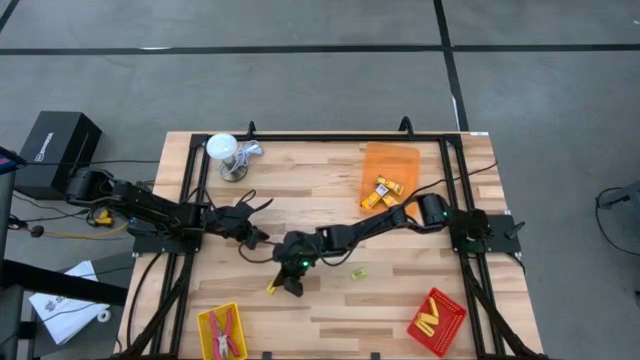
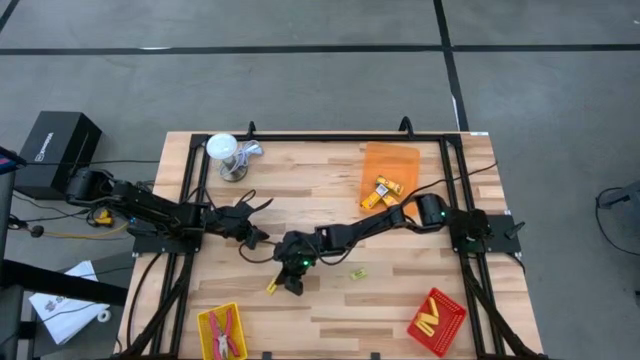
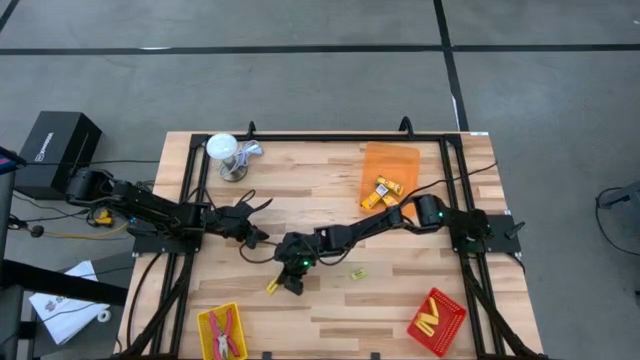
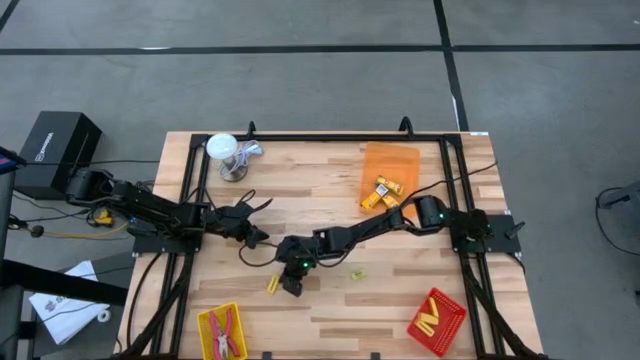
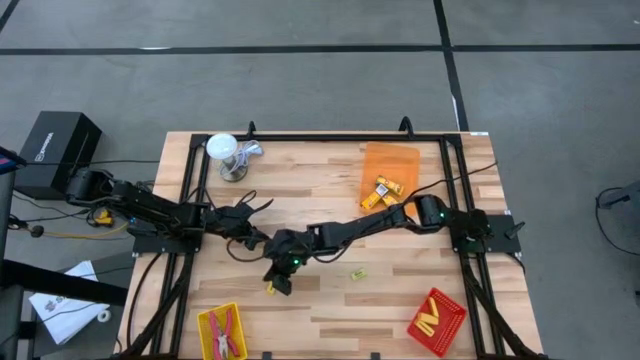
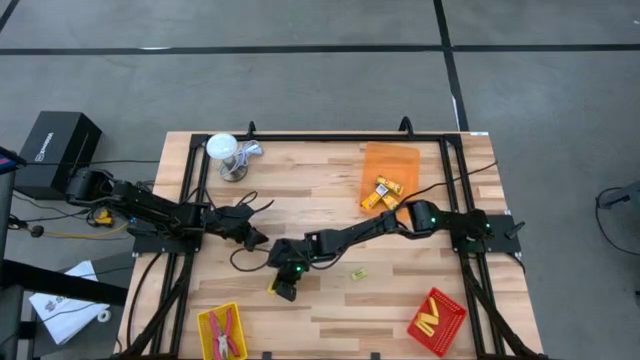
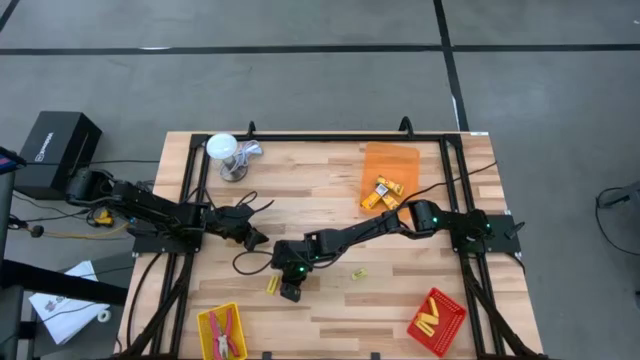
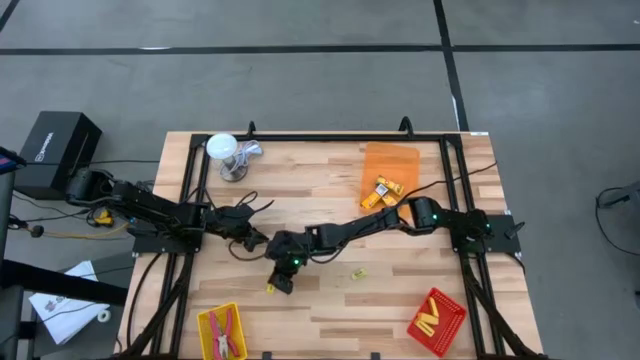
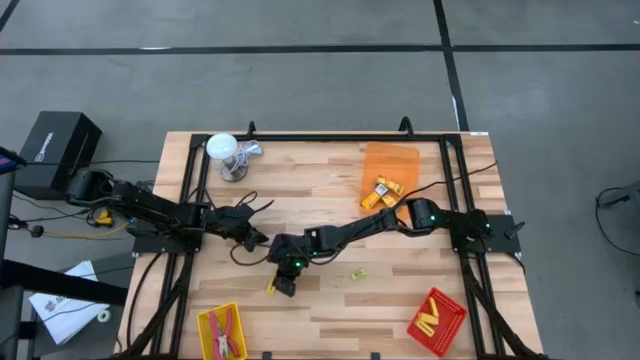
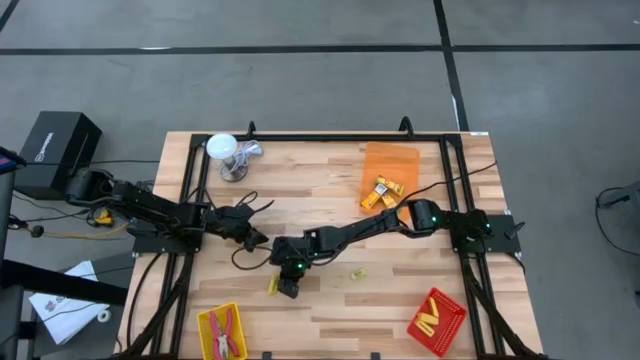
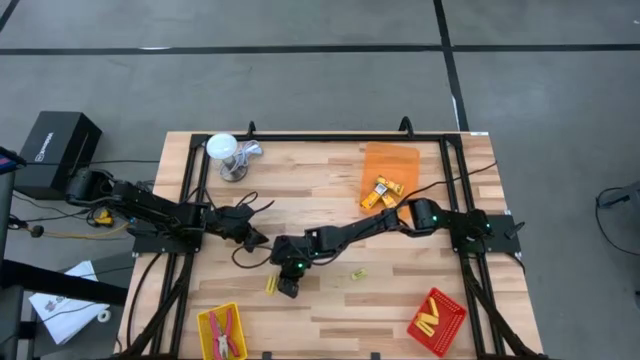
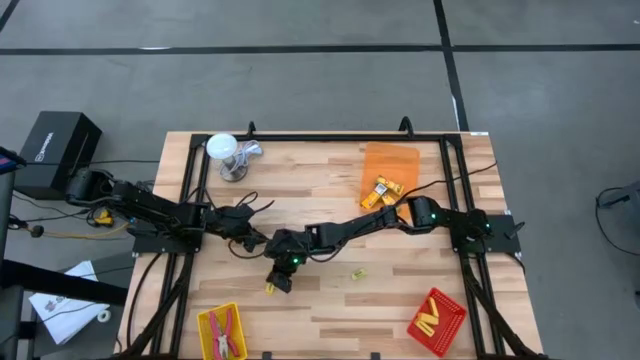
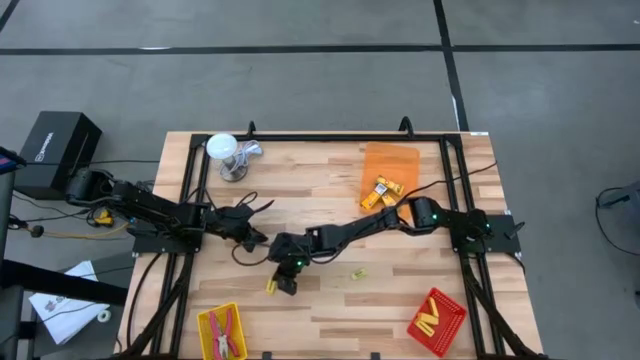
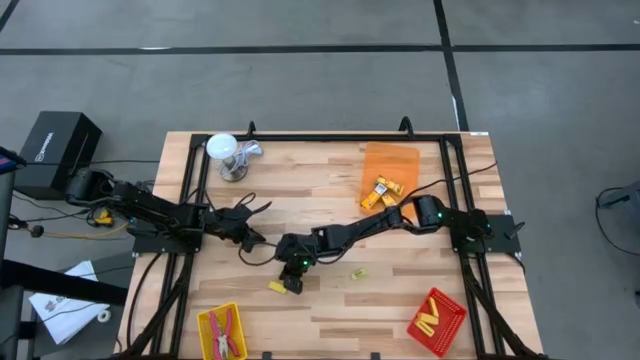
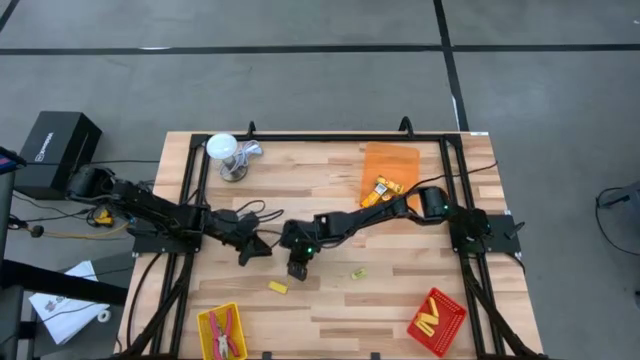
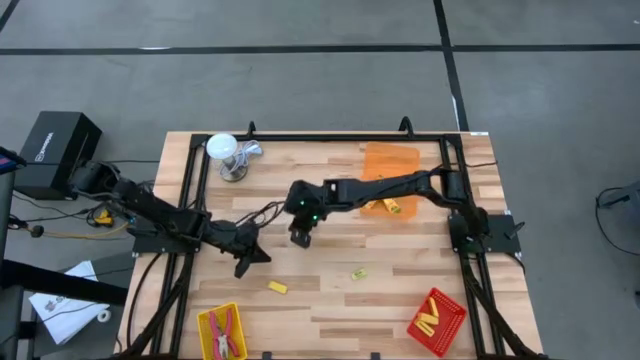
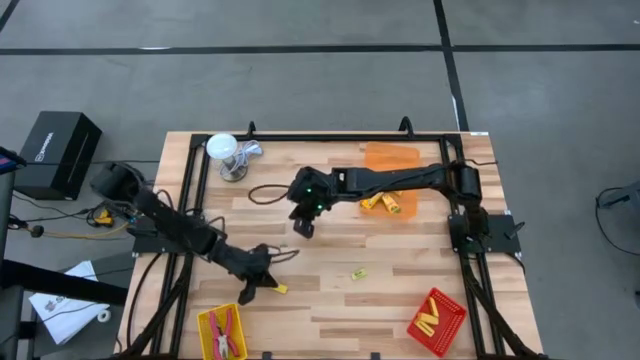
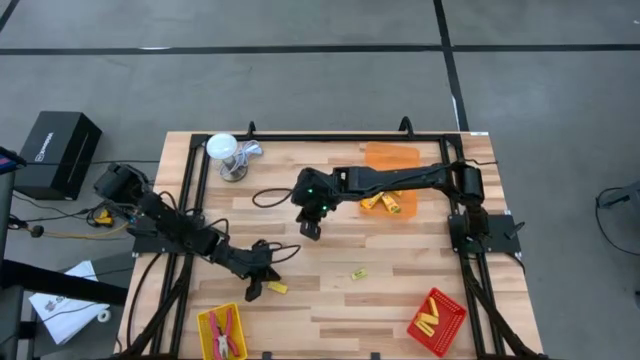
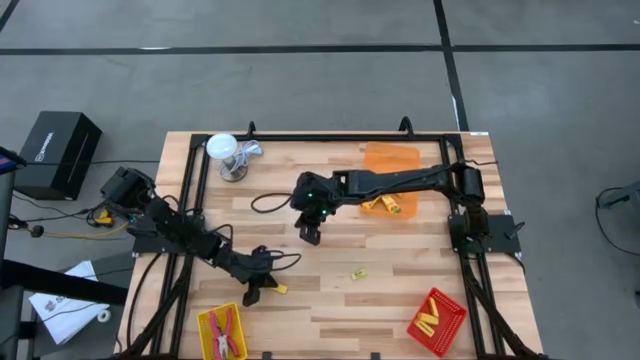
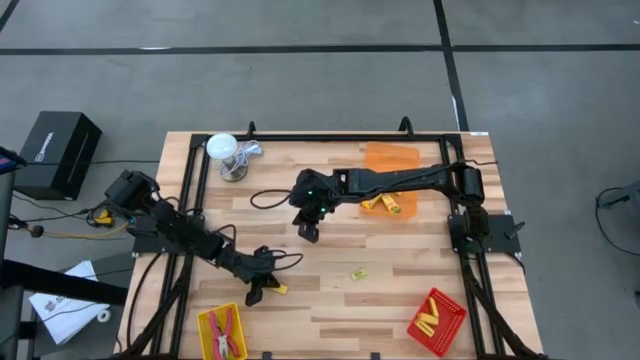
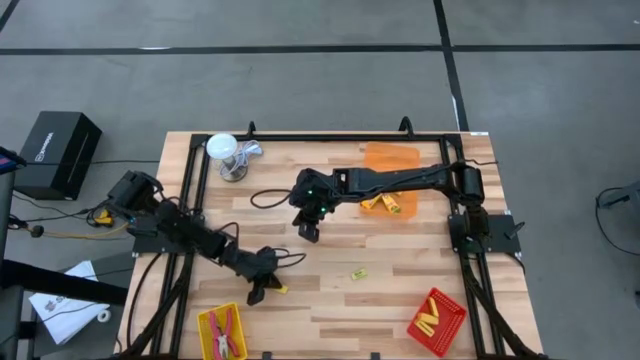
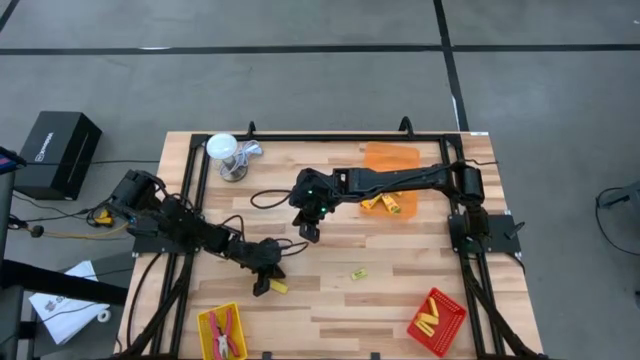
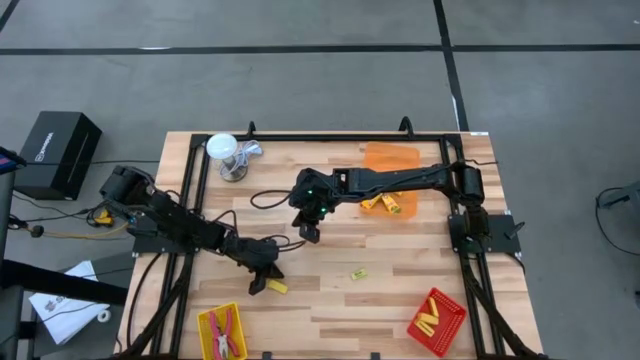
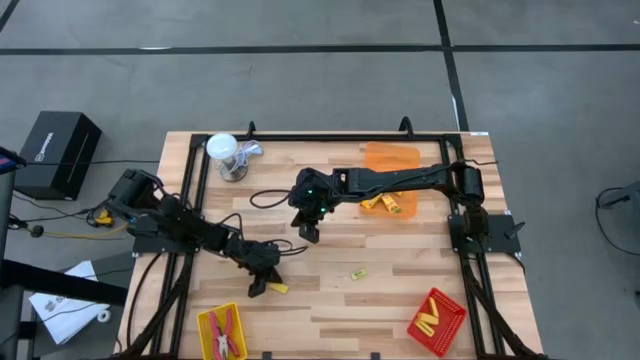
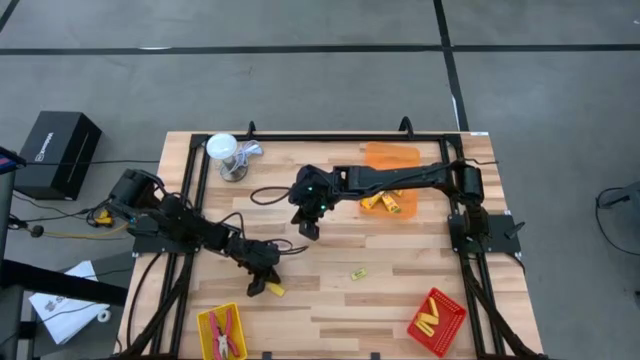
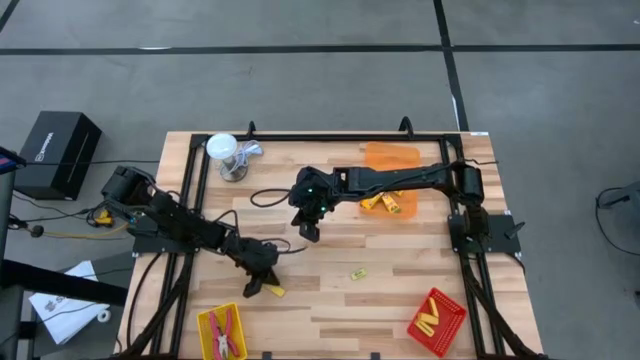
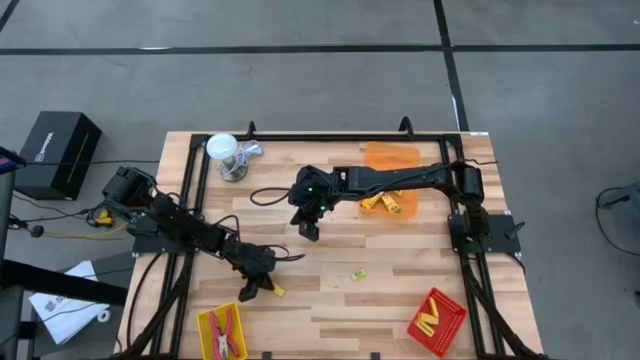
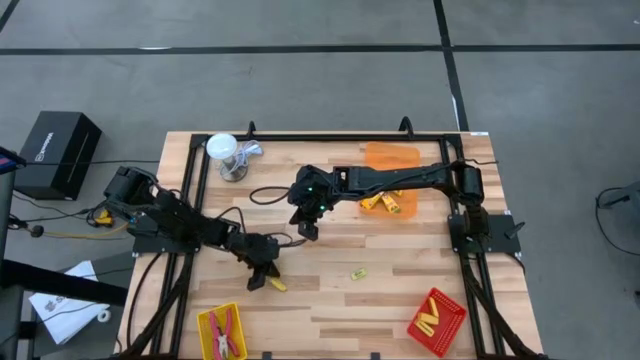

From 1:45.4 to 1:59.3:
Task: Pick & Place School Supplies
Put the yellow eraser into the red bin

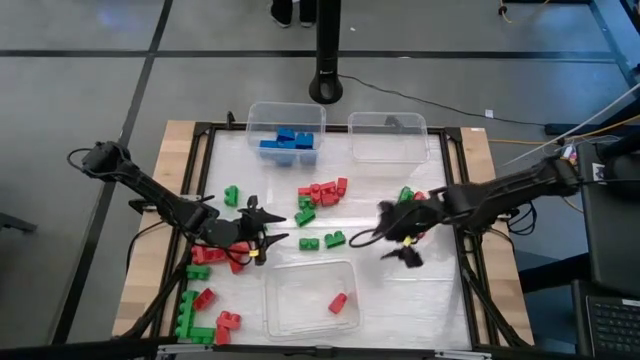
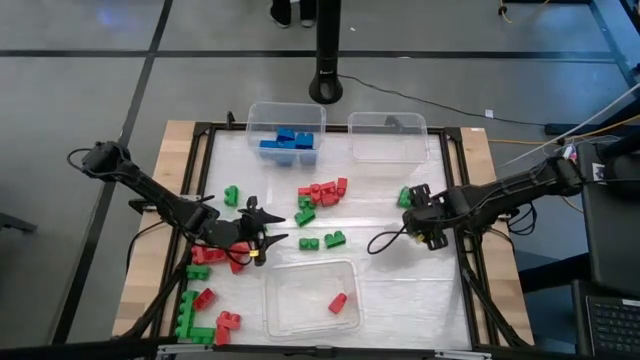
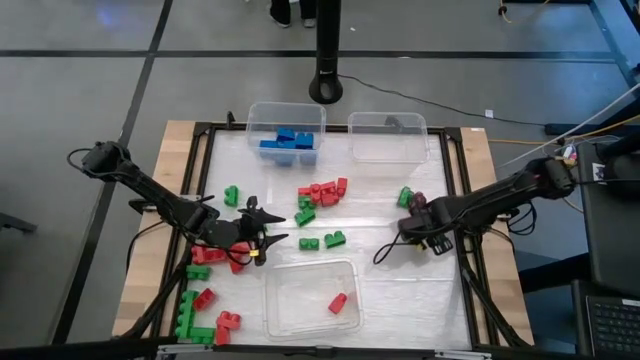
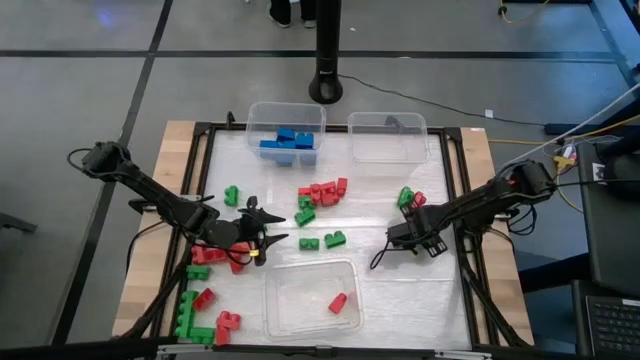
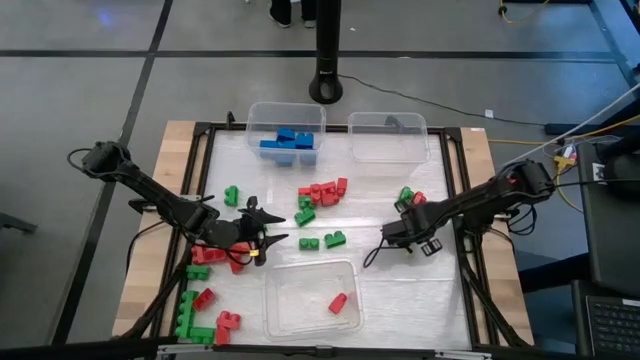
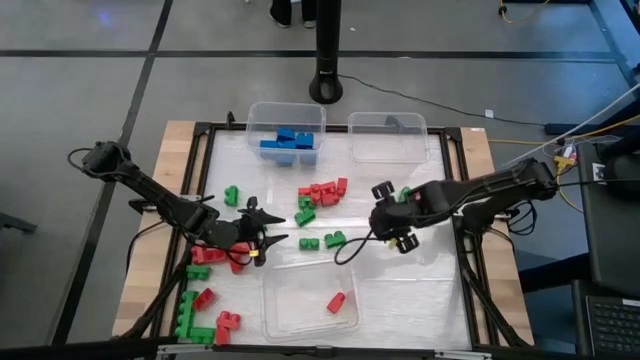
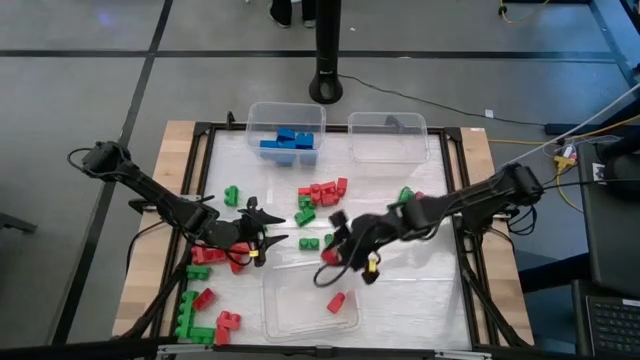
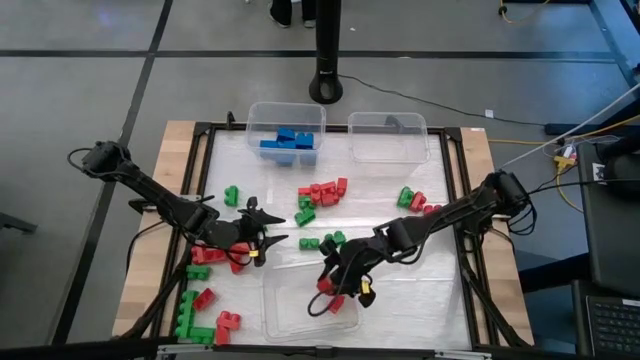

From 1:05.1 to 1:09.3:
Task: Sort blocks
Put the red game piece into the bottom transparent bin

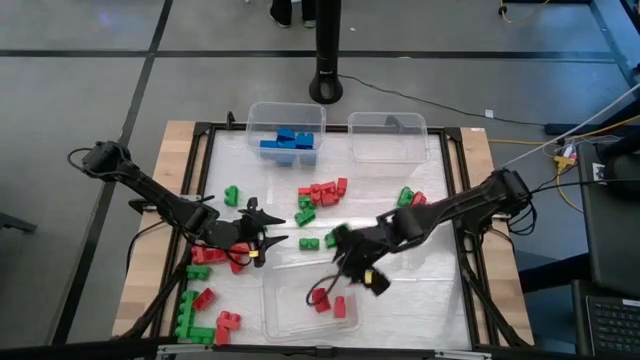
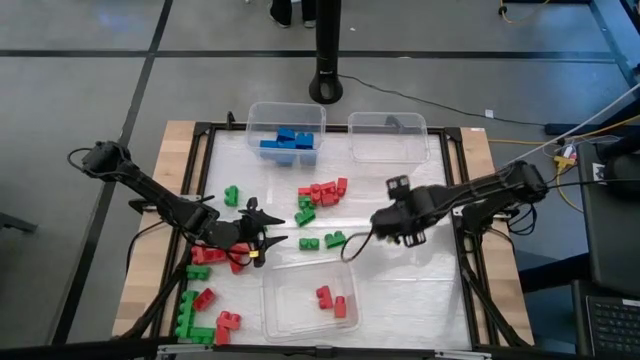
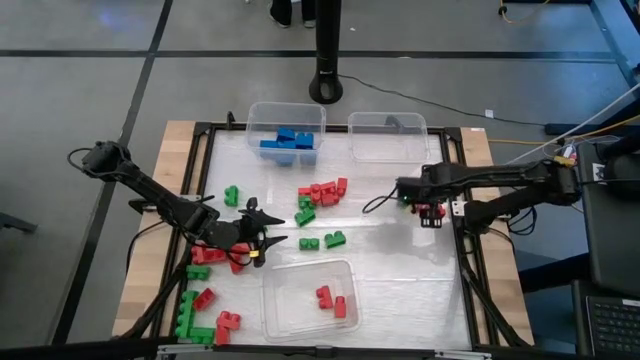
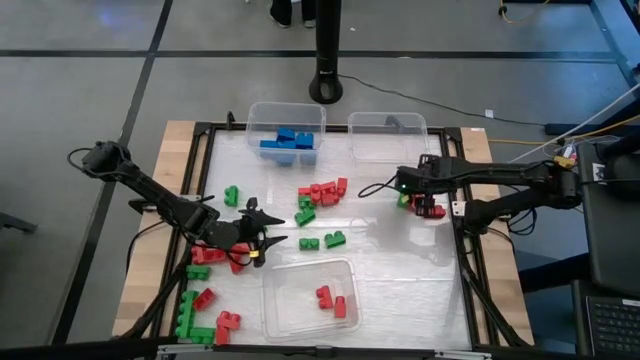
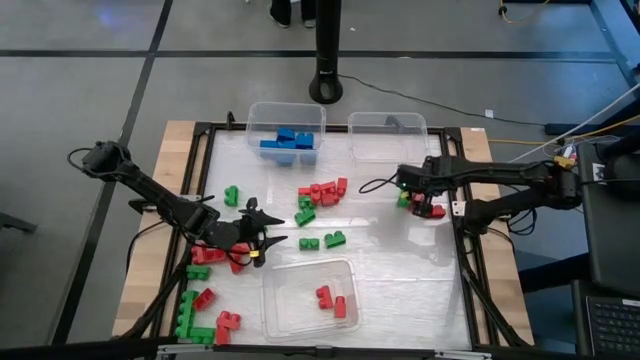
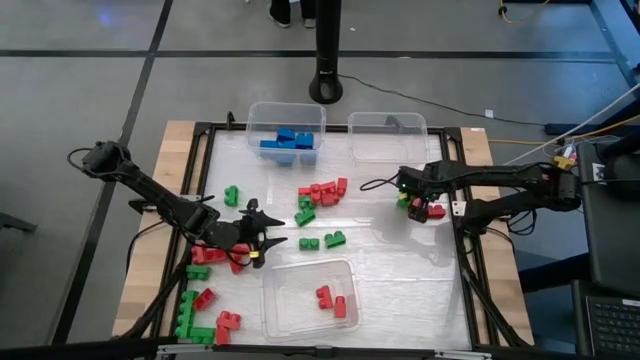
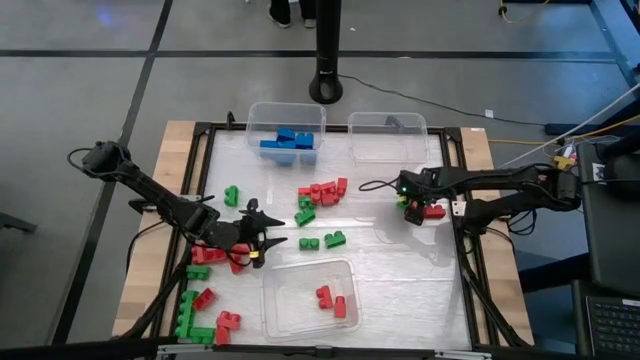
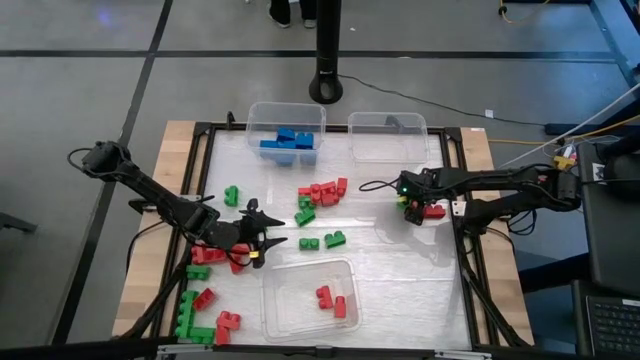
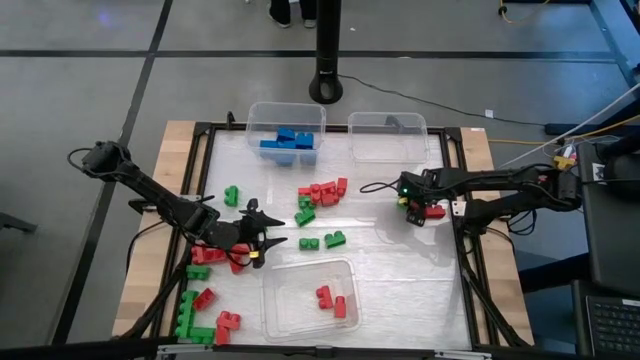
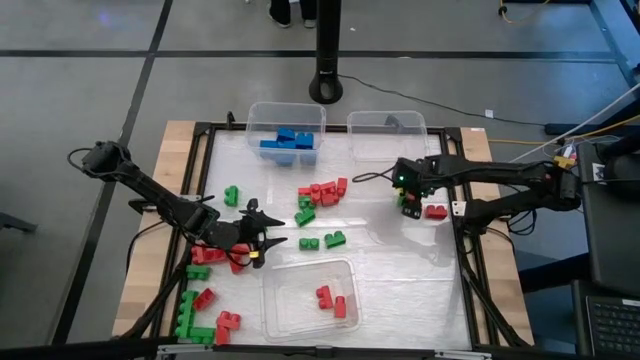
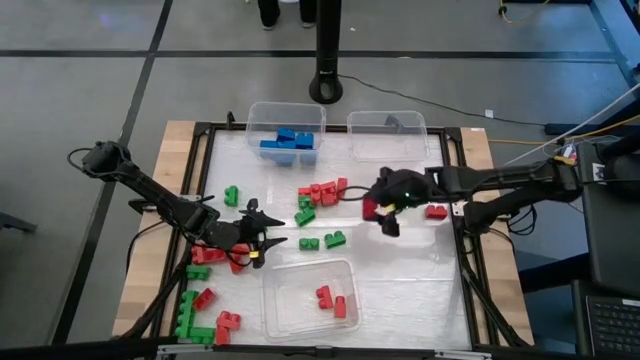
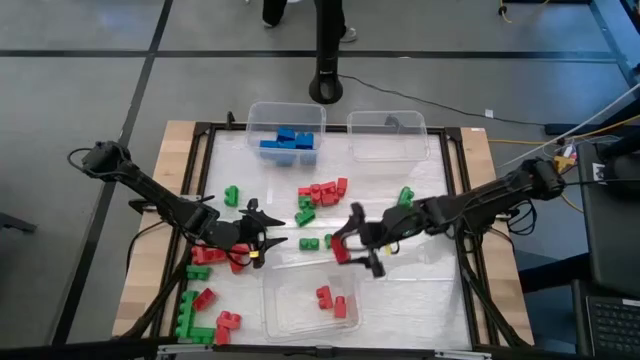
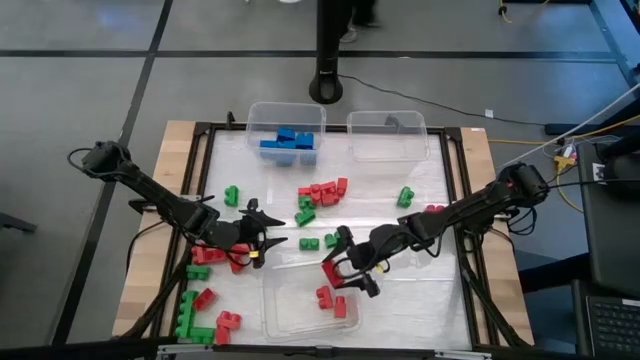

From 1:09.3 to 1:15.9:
Put the red game piece into the bottom transparent bin
